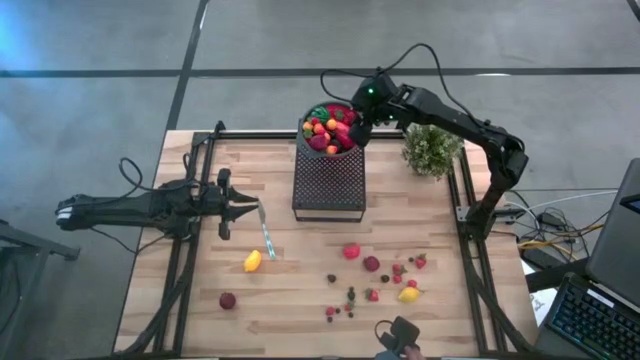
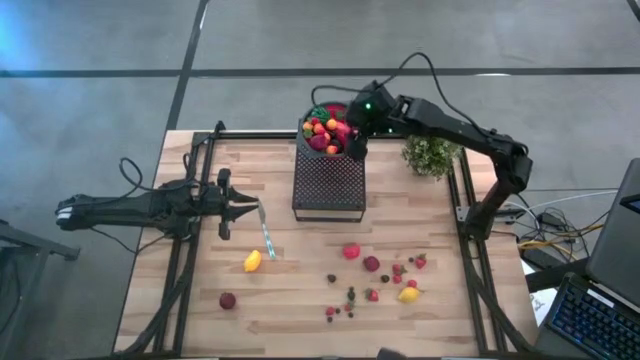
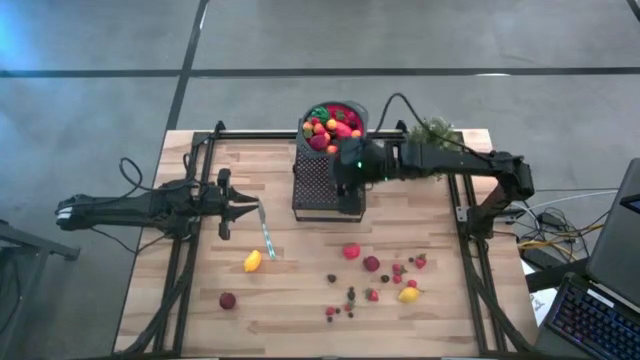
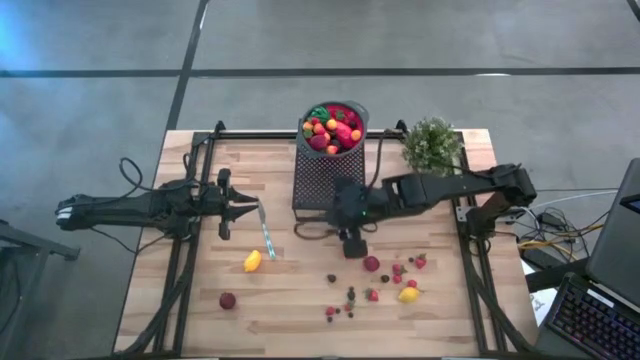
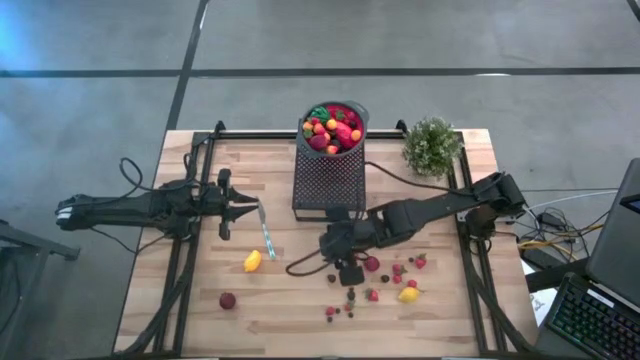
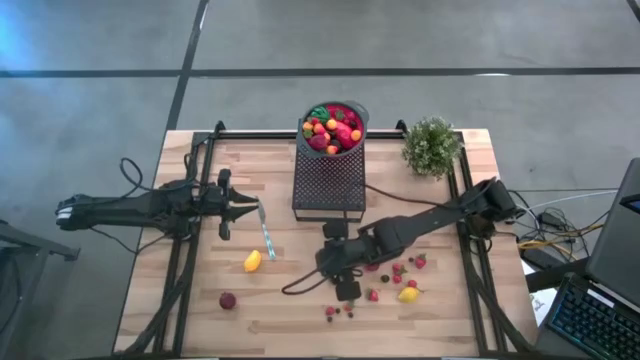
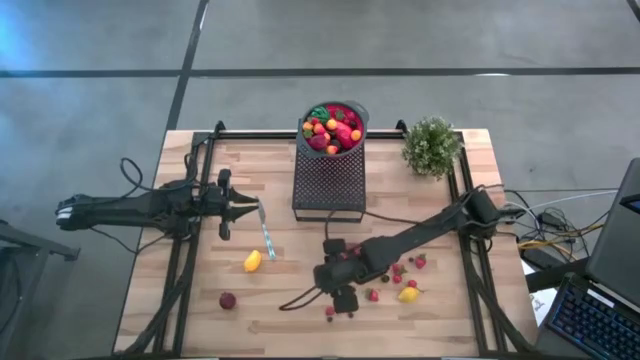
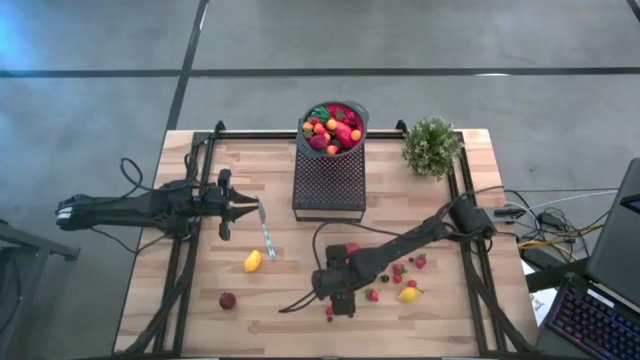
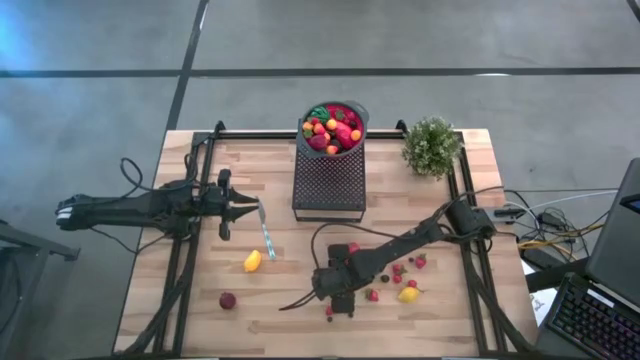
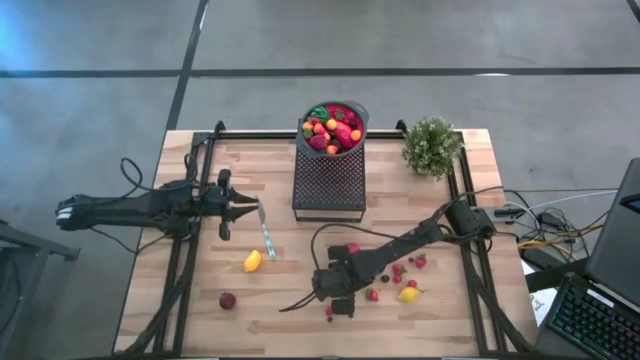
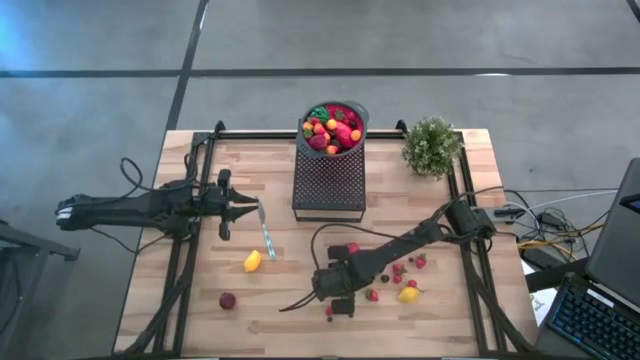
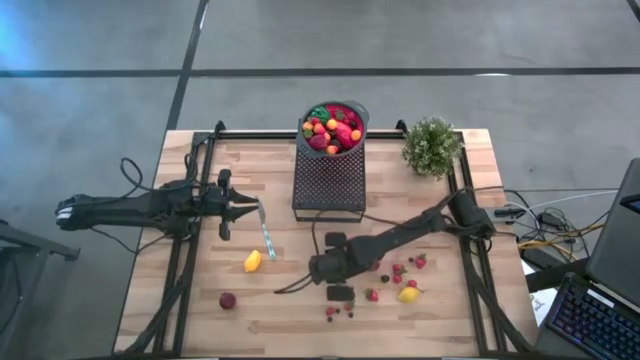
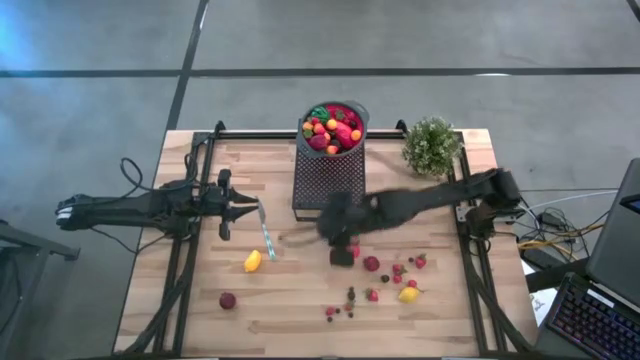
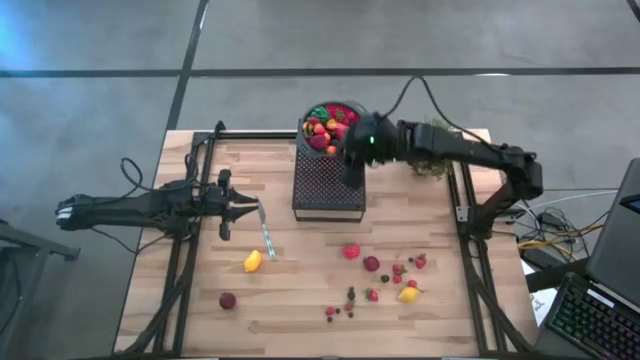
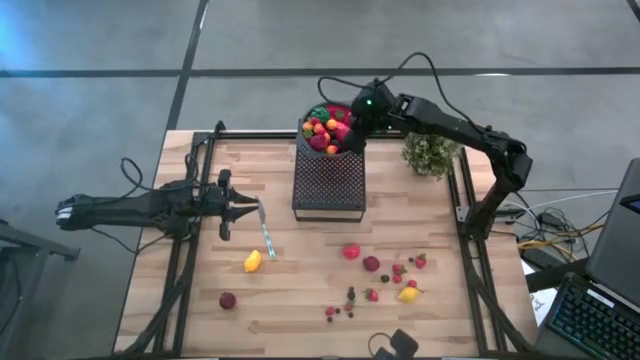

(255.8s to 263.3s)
Task: Pick & Place Fruit
Put the left blackberry into the strainer bowl on the shelf

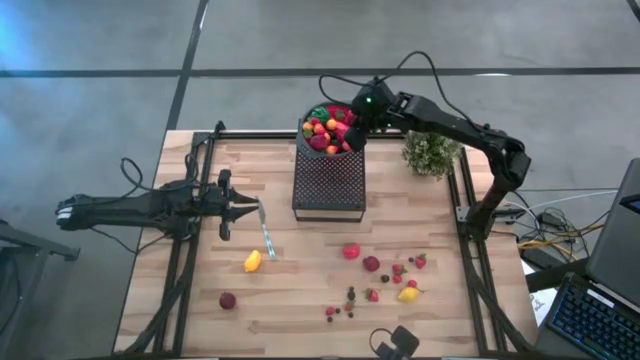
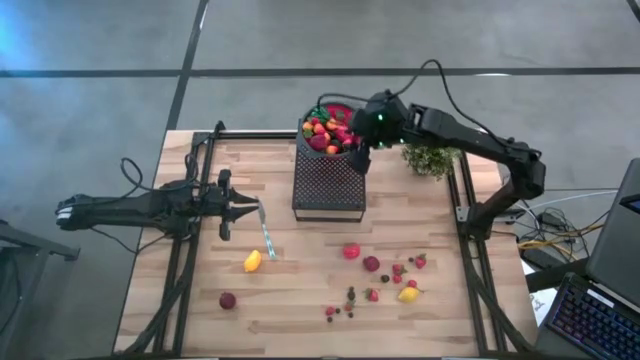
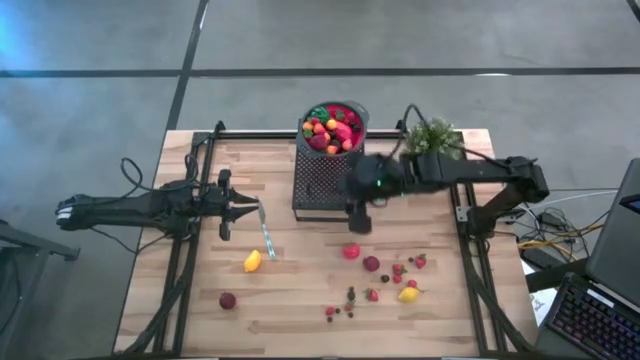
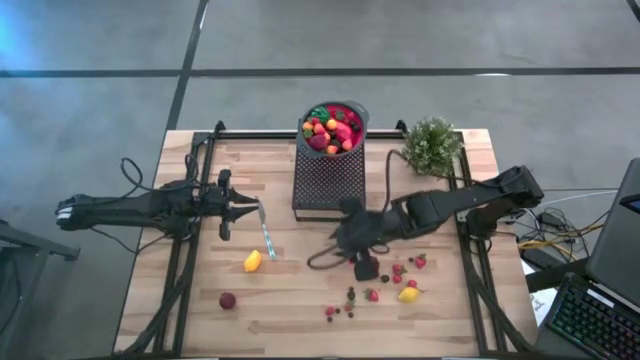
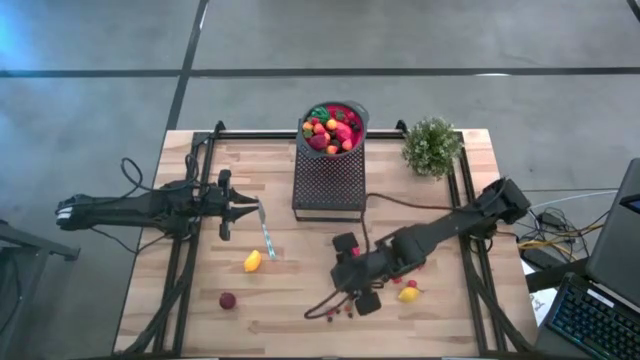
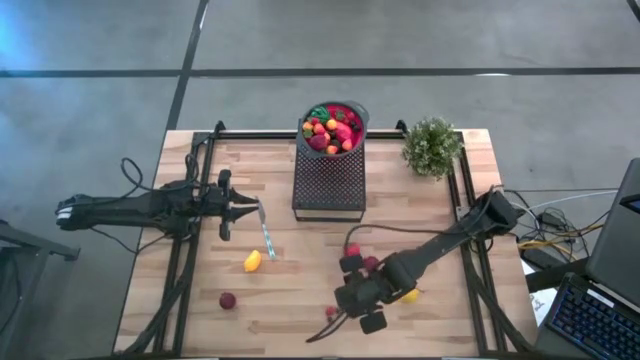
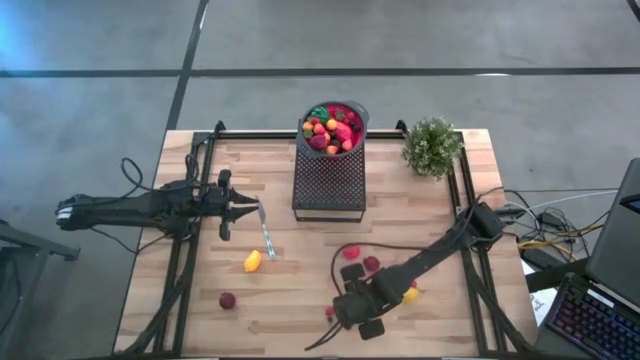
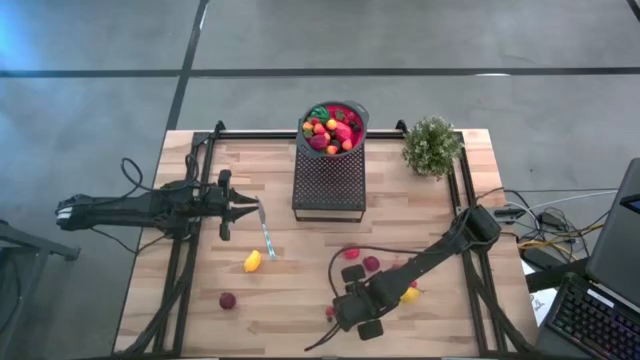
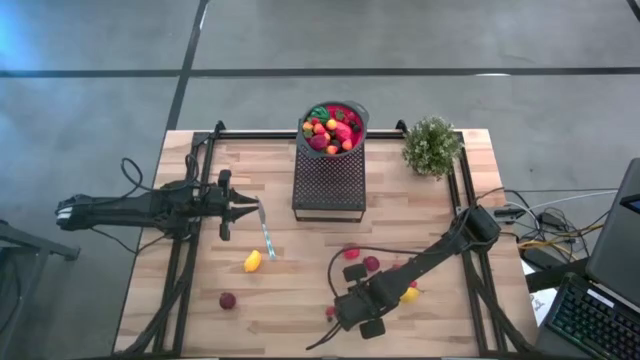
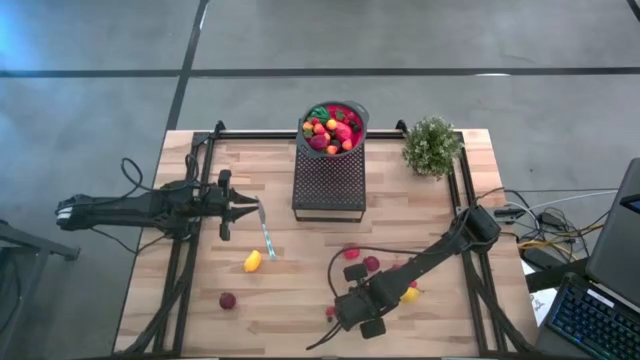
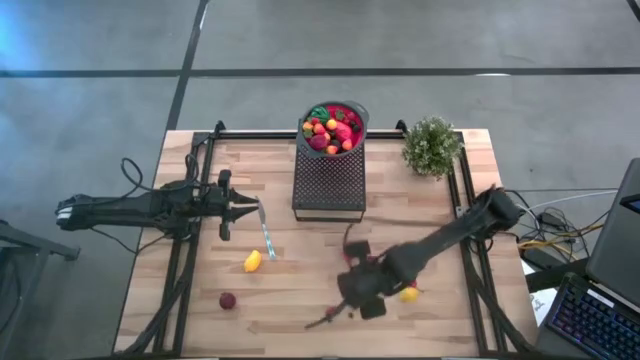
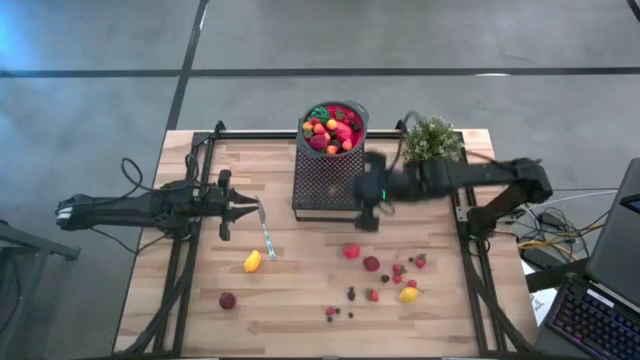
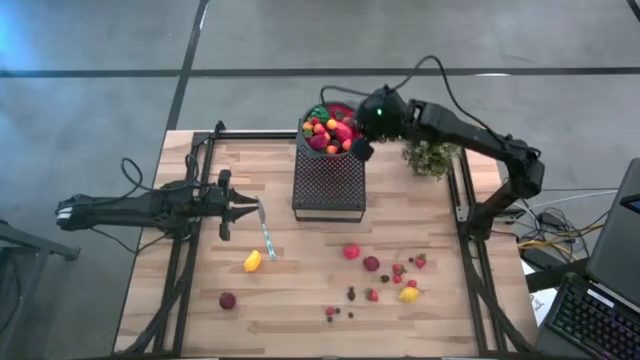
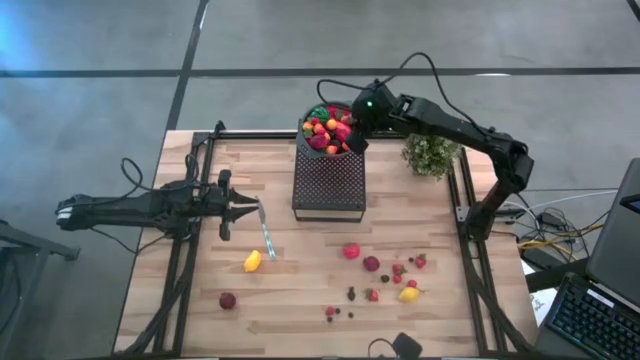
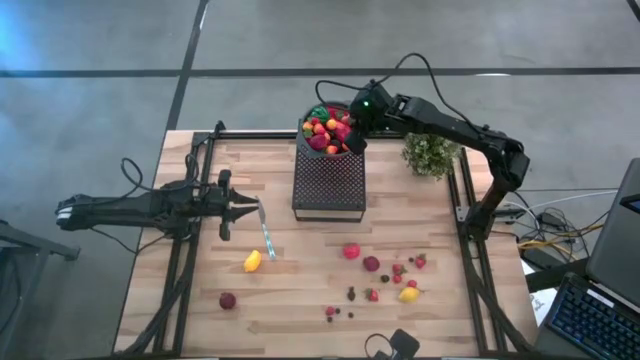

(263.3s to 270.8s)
Put the strawberry into the strainer bowl on the shelf

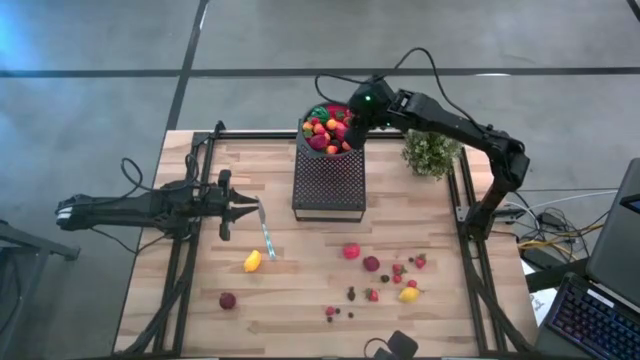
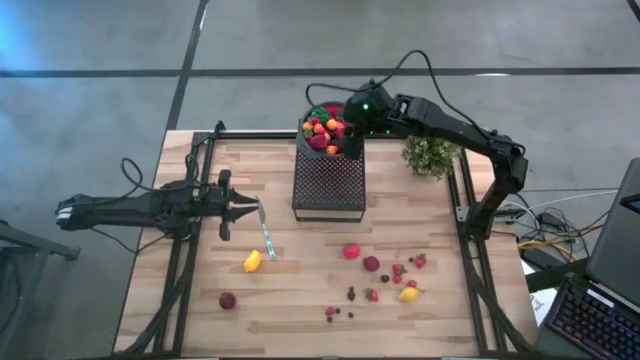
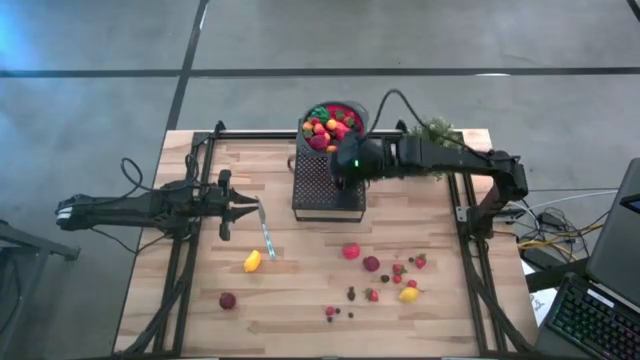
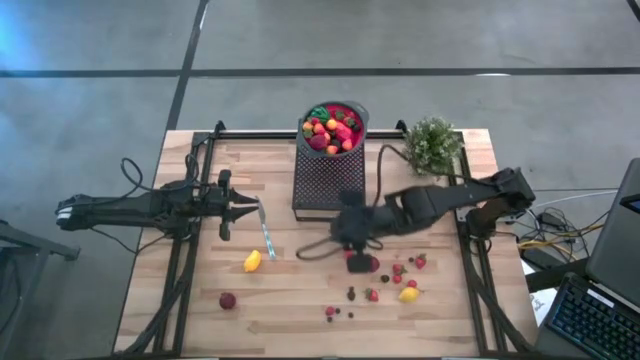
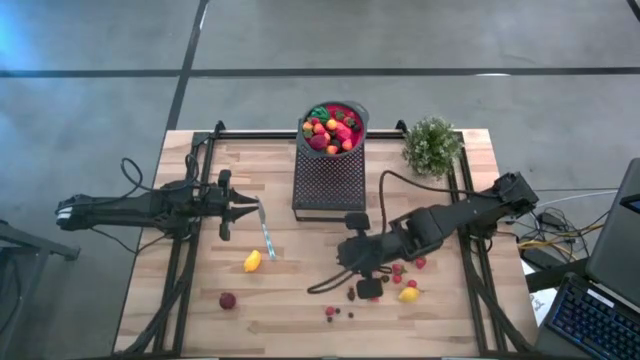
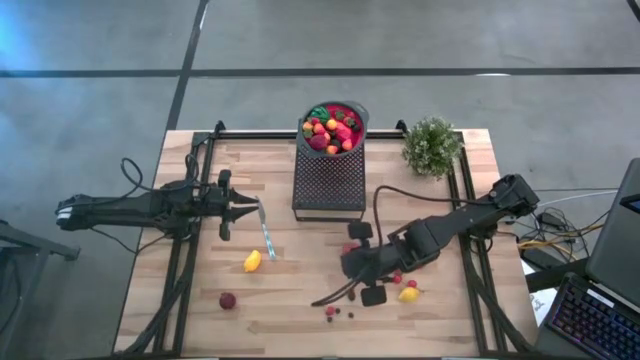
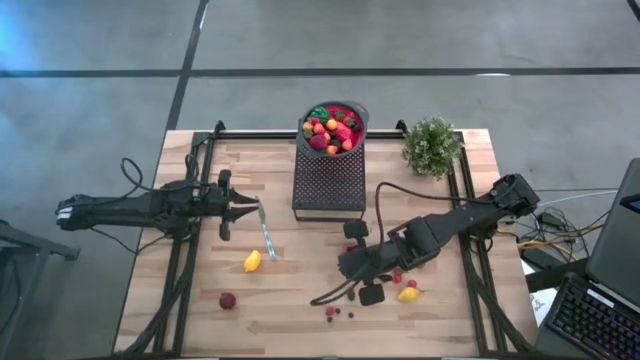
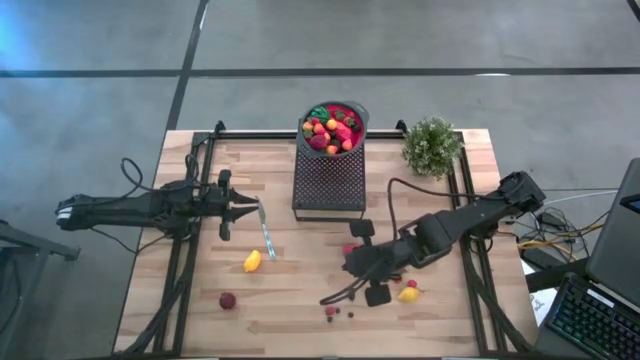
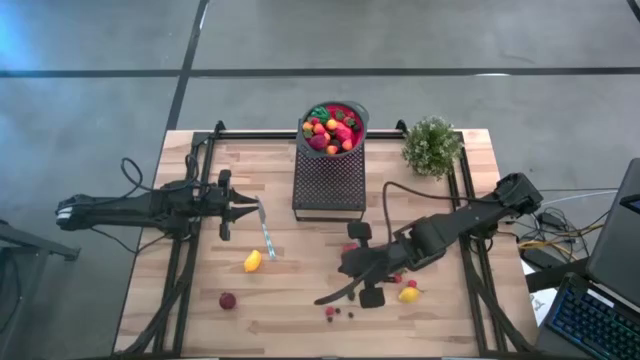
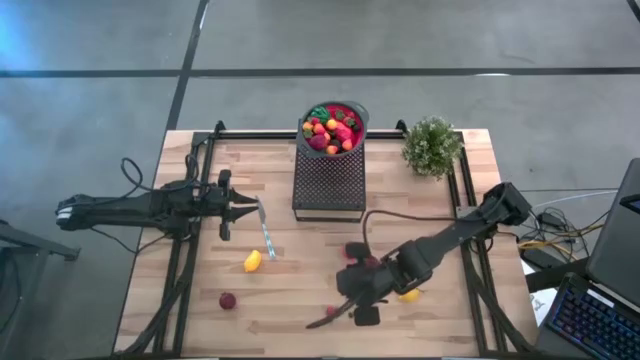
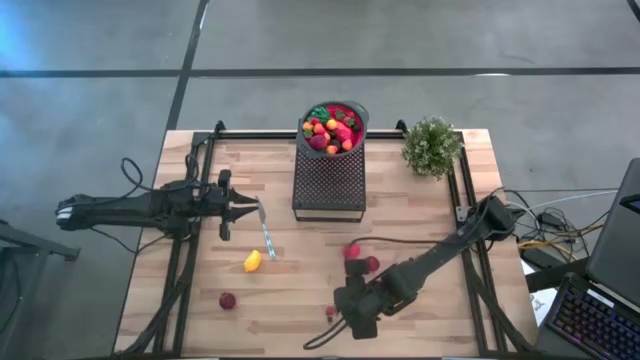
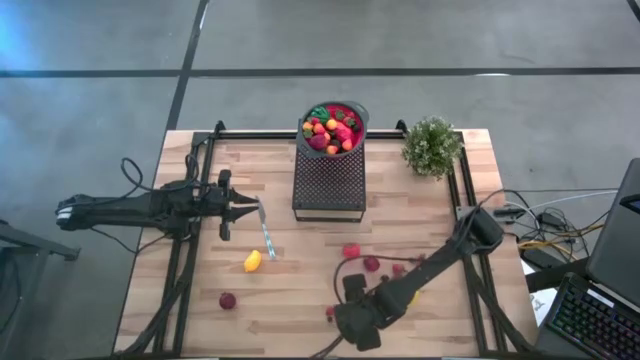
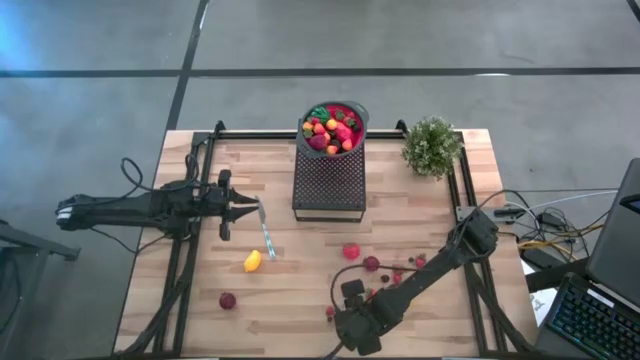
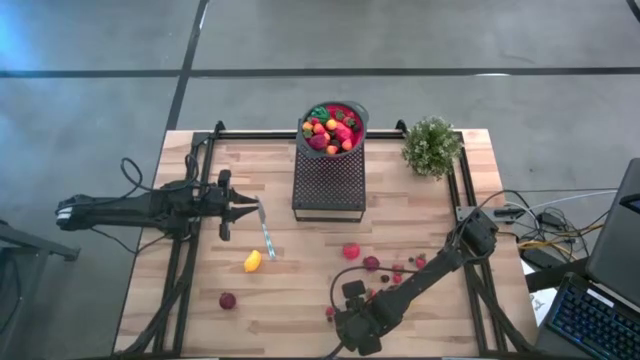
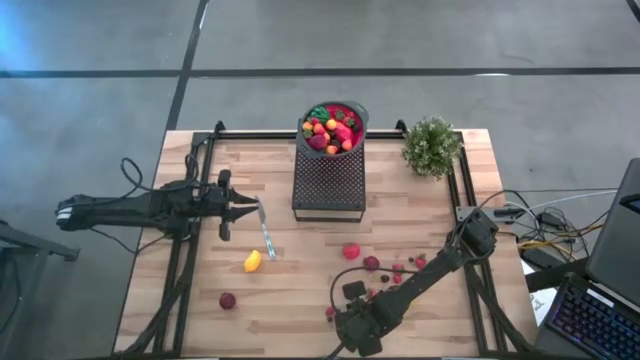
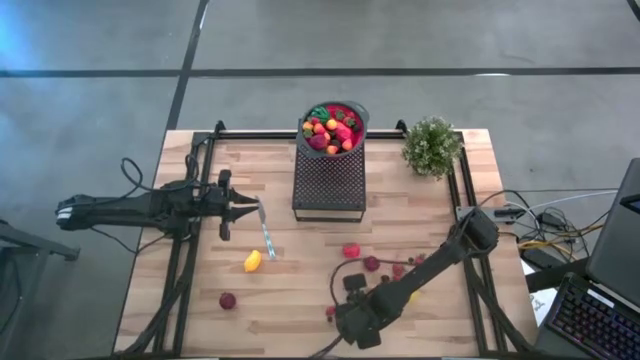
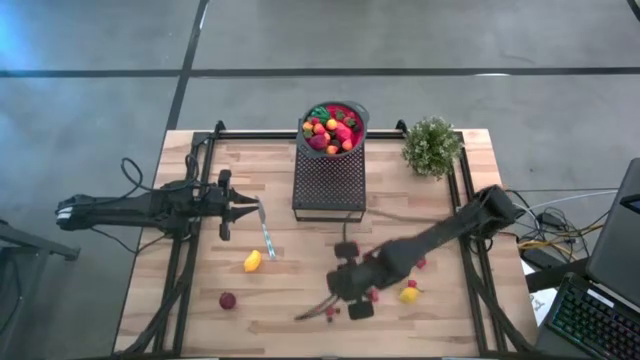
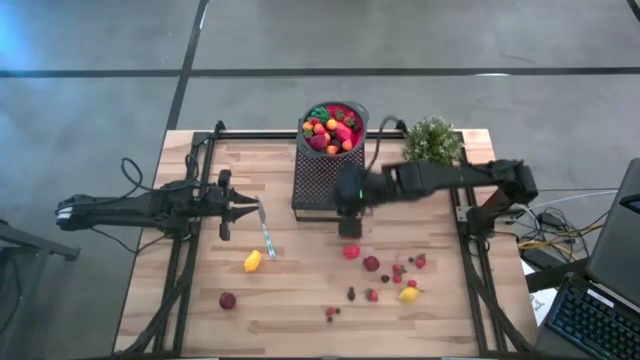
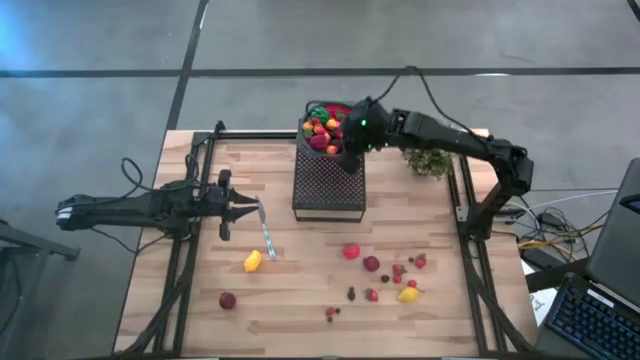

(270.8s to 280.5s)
Put the blueberry into the strainer bowl on the shelf
